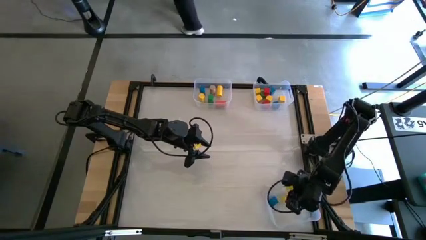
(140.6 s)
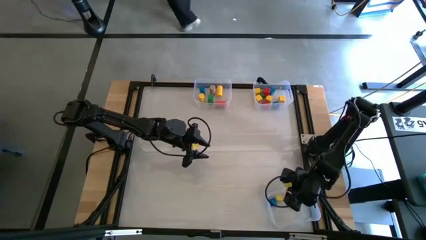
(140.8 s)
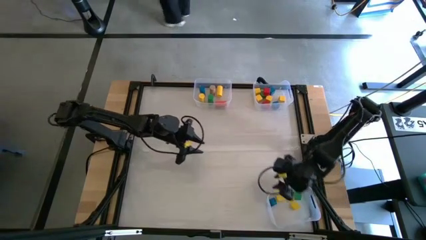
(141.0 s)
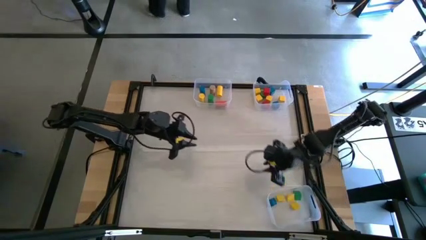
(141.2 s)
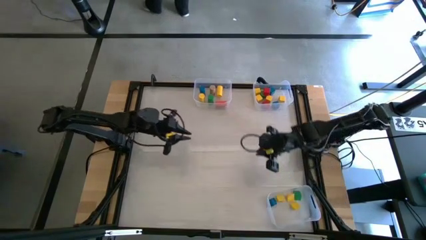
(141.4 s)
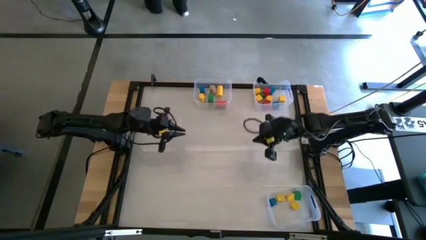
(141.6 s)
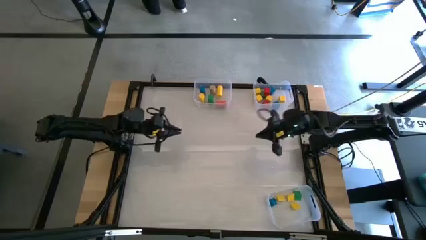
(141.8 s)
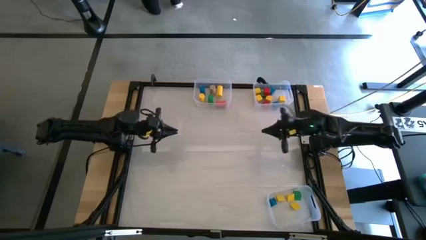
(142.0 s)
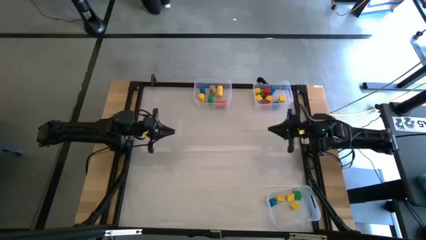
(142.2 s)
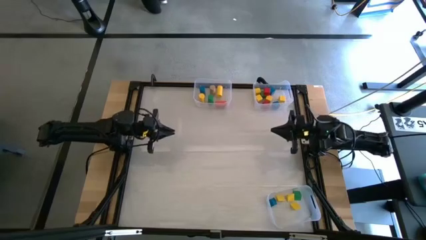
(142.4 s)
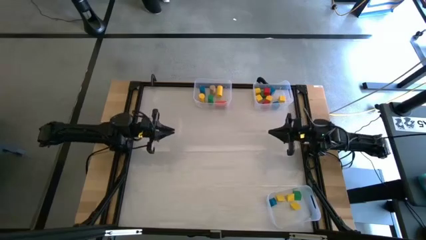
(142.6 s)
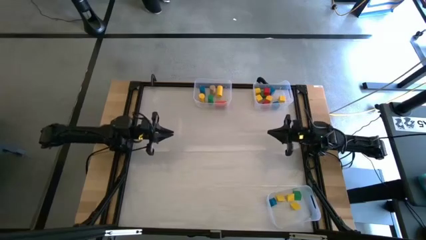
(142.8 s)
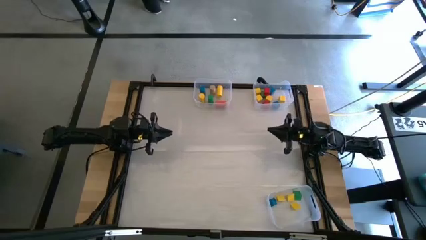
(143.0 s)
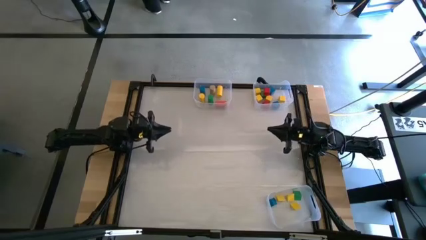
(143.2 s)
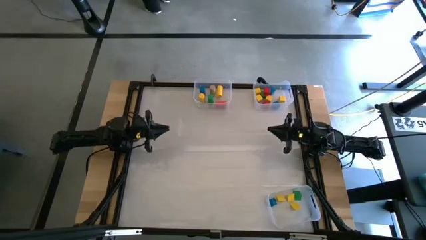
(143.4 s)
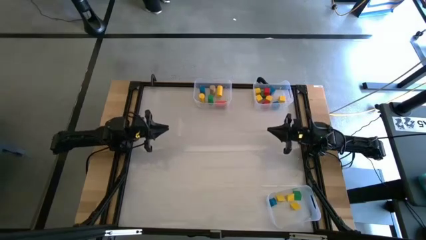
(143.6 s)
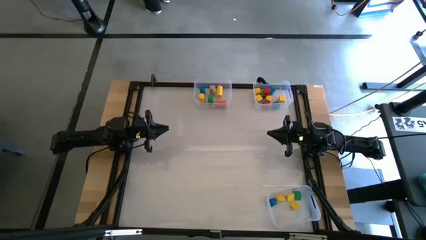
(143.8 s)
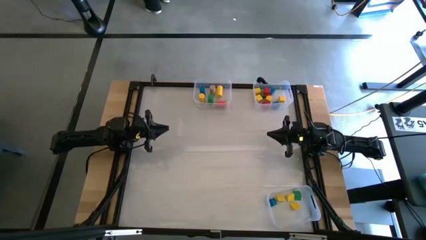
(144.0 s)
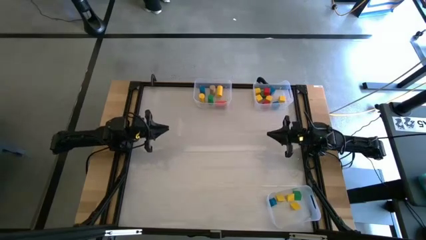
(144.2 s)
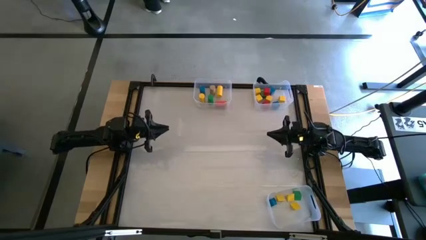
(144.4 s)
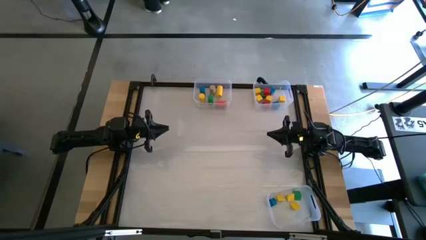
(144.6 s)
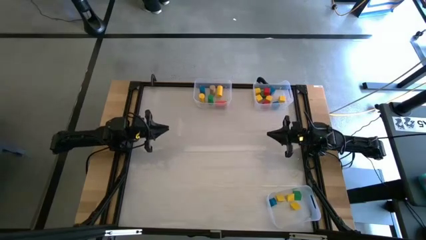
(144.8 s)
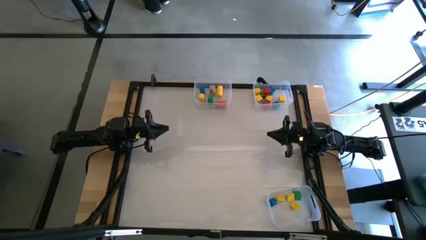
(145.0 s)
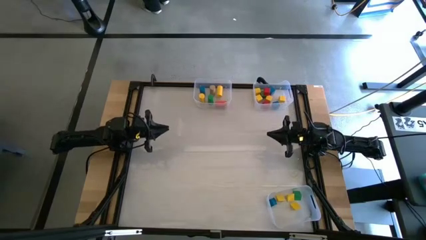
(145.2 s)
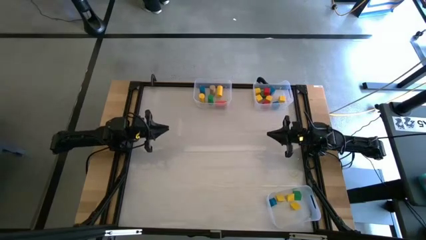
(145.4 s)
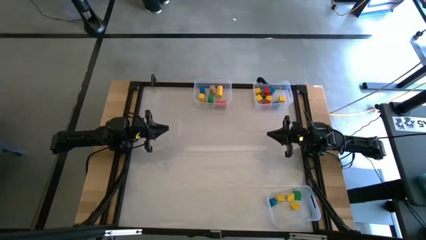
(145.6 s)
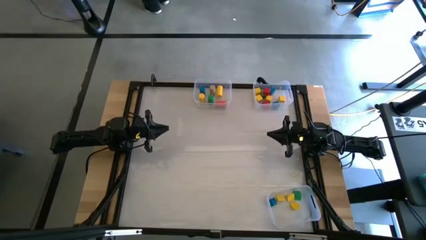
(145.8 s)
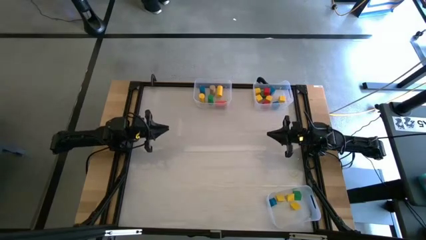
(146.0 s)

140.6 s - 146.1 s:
Task: Sort blocks by size
Return to Home Position

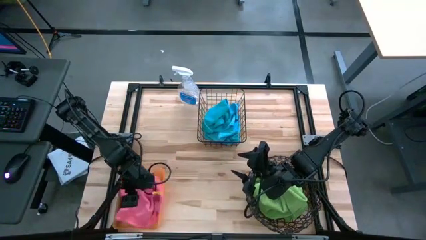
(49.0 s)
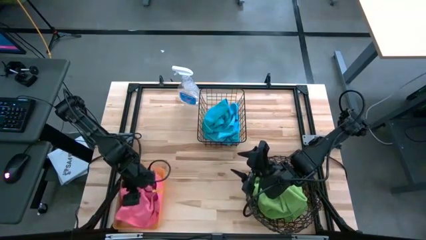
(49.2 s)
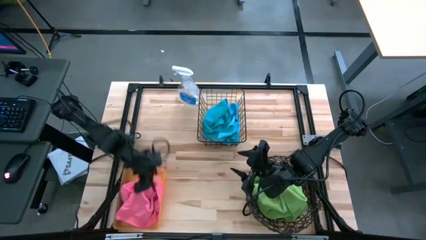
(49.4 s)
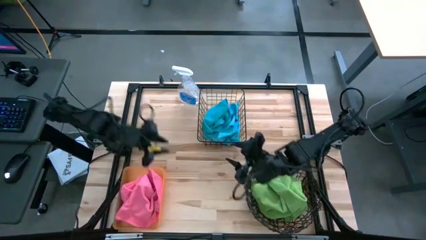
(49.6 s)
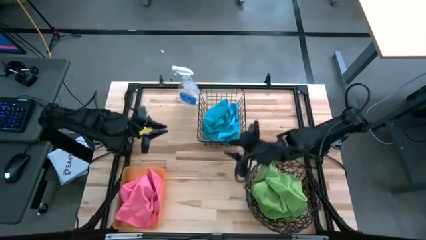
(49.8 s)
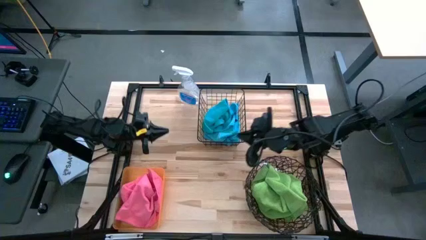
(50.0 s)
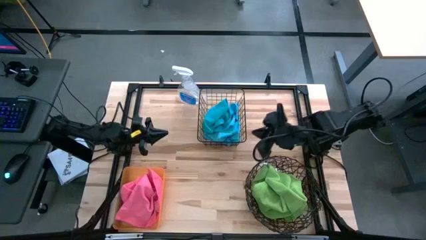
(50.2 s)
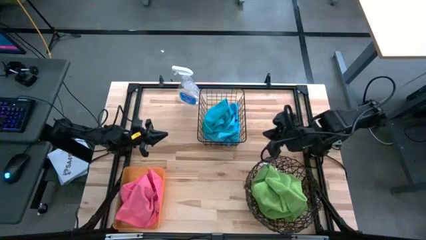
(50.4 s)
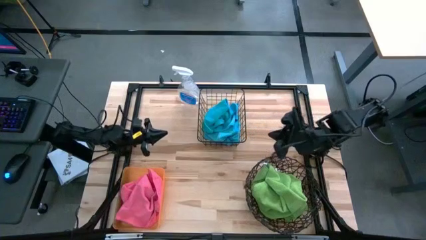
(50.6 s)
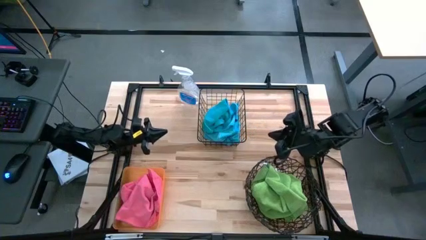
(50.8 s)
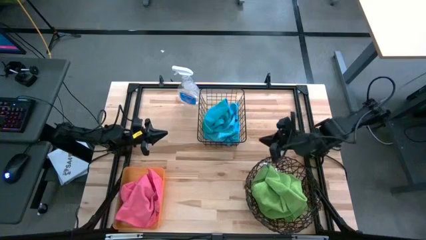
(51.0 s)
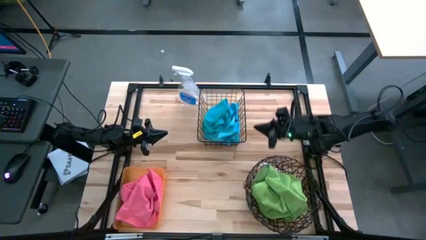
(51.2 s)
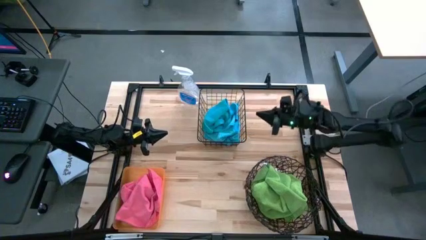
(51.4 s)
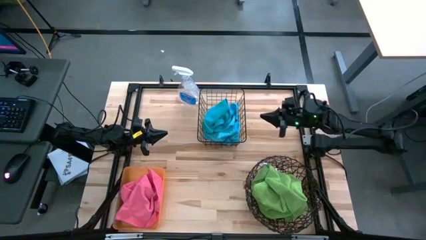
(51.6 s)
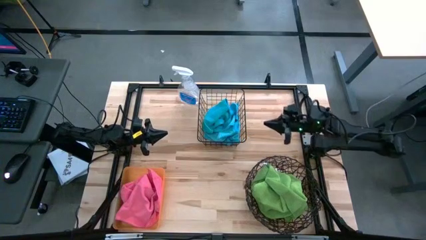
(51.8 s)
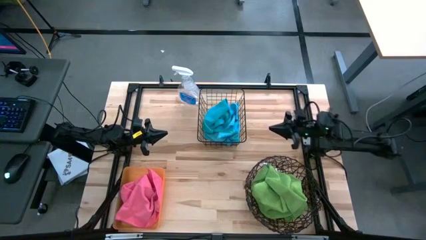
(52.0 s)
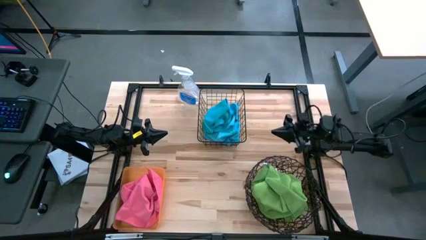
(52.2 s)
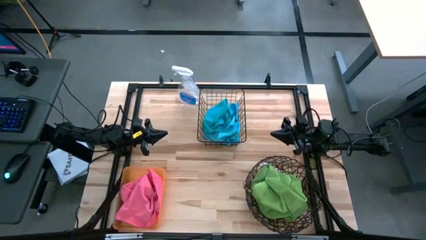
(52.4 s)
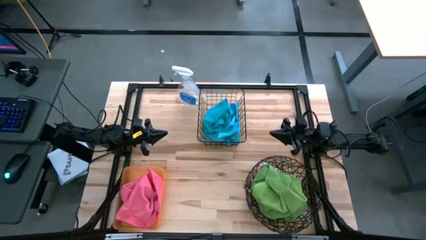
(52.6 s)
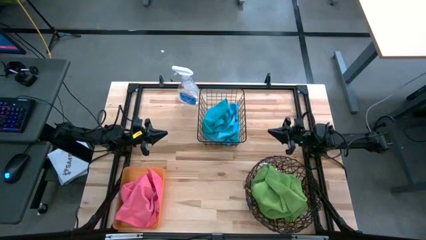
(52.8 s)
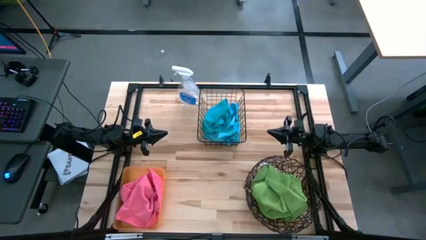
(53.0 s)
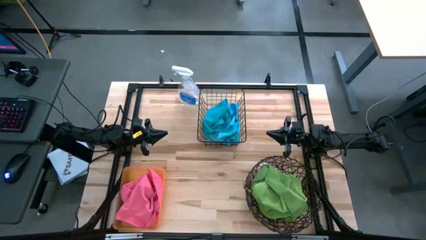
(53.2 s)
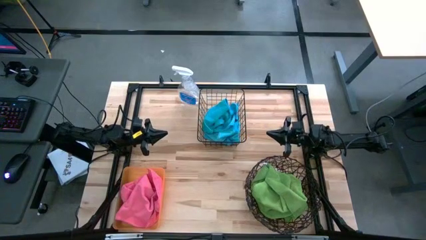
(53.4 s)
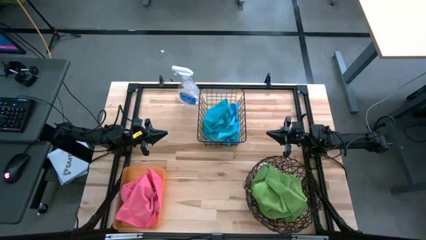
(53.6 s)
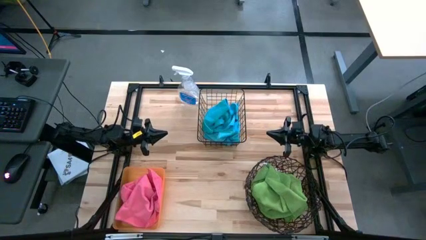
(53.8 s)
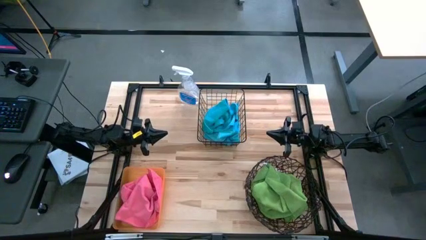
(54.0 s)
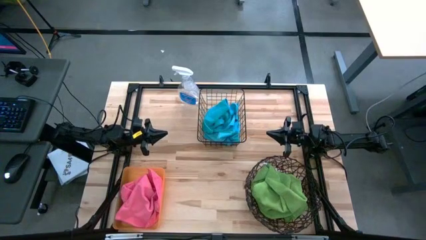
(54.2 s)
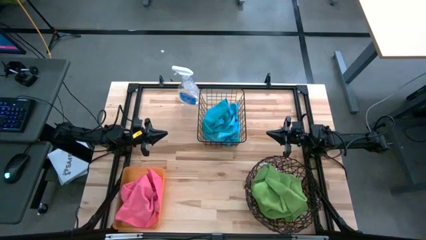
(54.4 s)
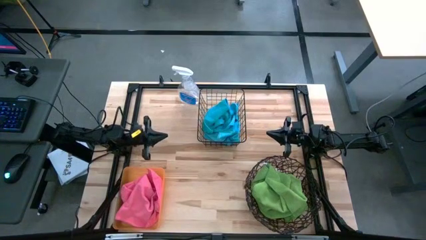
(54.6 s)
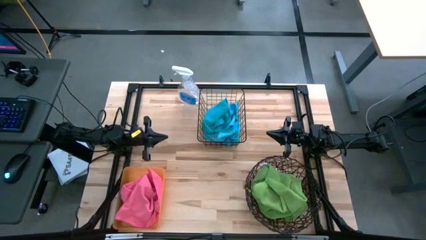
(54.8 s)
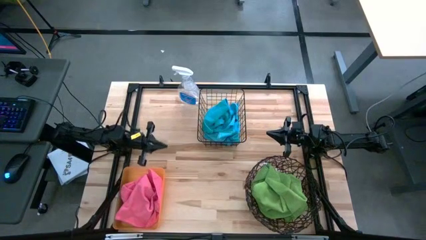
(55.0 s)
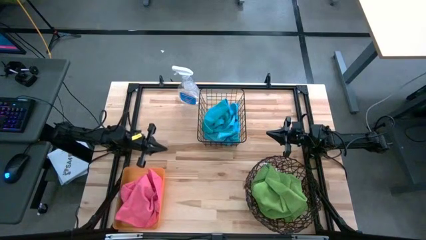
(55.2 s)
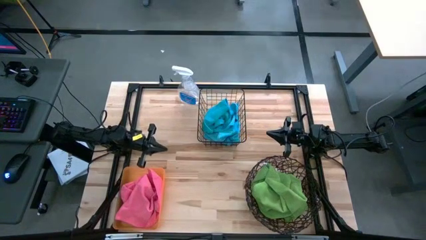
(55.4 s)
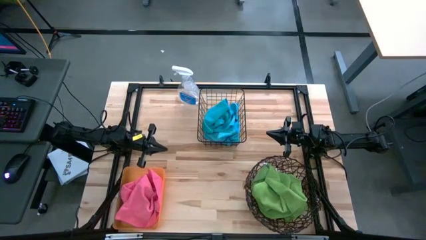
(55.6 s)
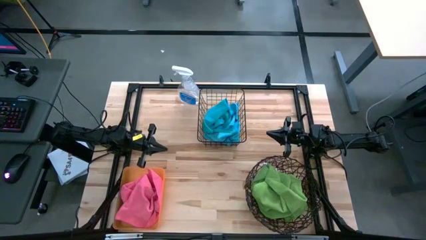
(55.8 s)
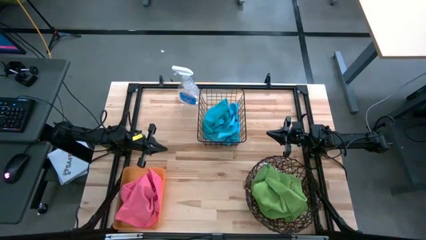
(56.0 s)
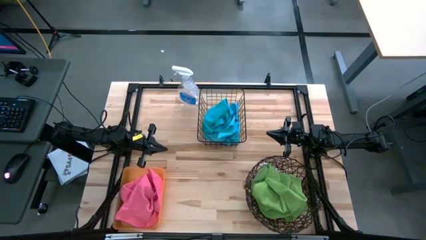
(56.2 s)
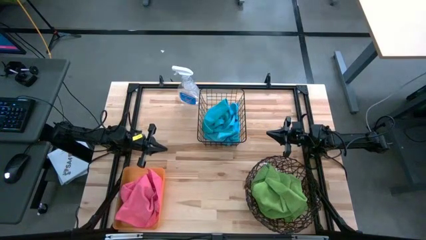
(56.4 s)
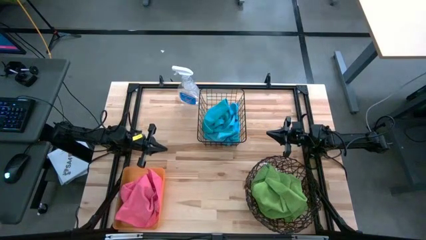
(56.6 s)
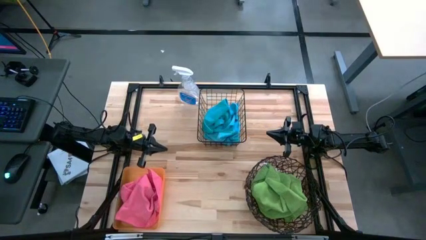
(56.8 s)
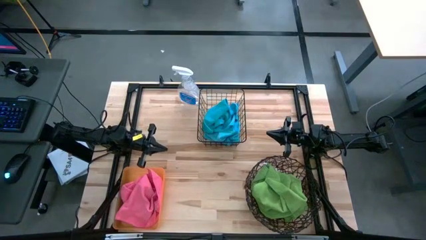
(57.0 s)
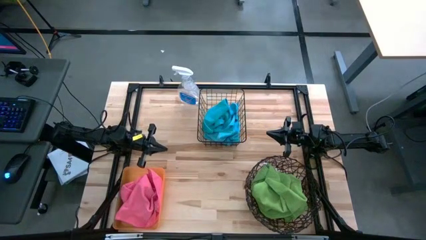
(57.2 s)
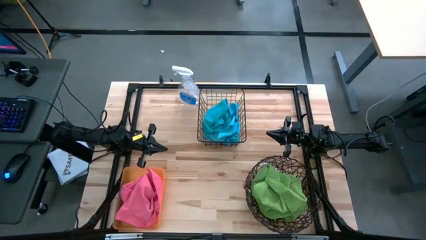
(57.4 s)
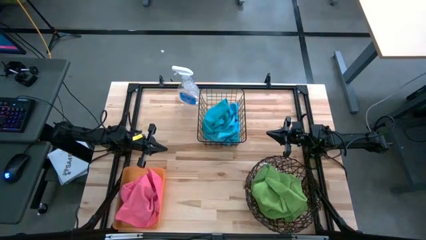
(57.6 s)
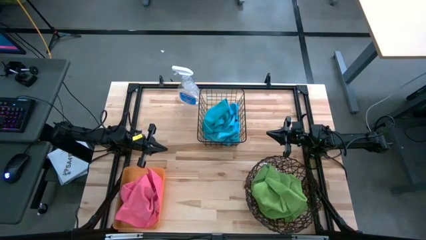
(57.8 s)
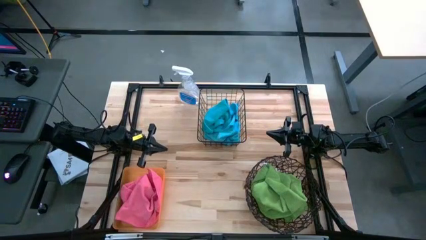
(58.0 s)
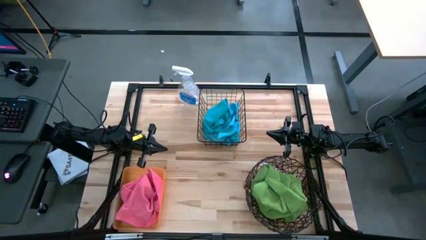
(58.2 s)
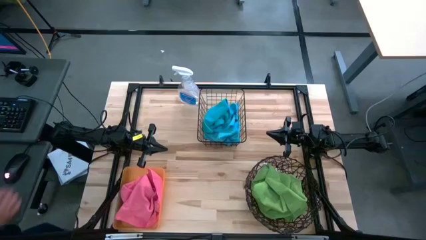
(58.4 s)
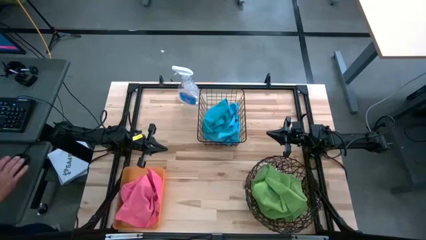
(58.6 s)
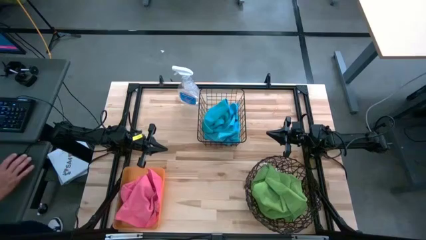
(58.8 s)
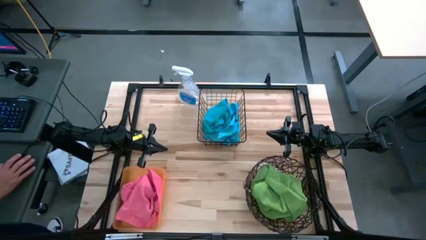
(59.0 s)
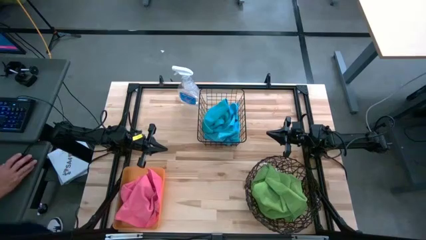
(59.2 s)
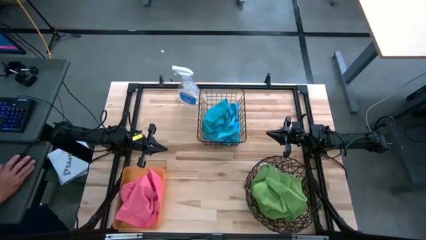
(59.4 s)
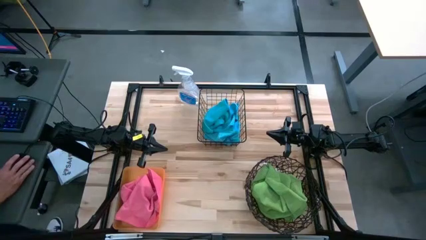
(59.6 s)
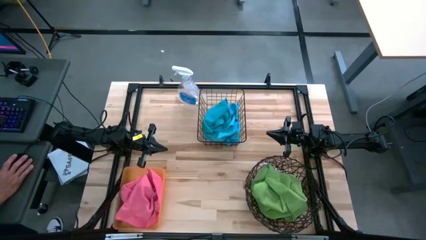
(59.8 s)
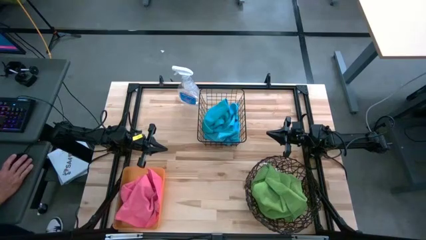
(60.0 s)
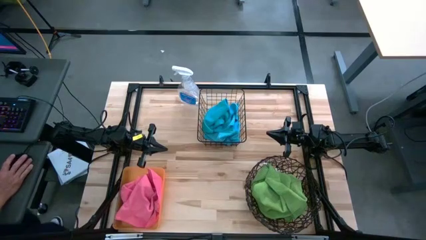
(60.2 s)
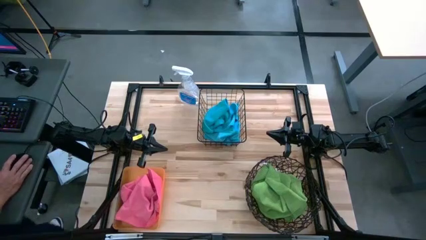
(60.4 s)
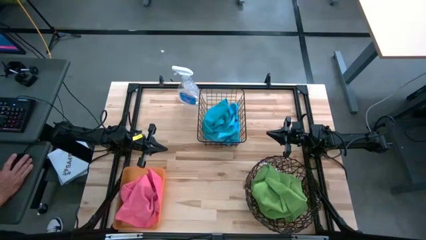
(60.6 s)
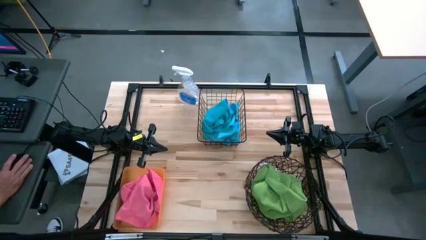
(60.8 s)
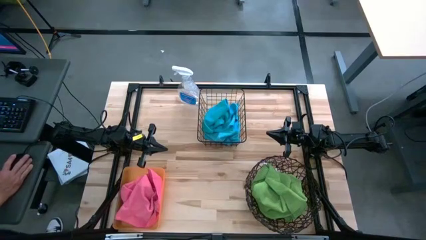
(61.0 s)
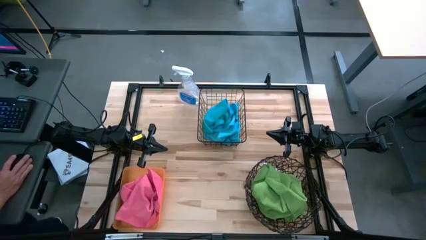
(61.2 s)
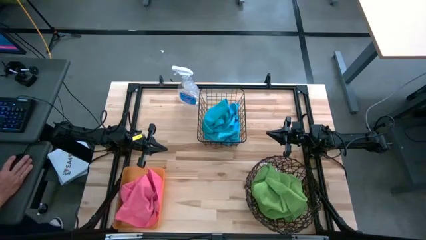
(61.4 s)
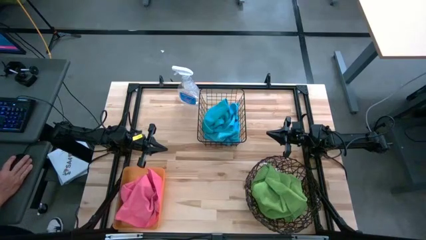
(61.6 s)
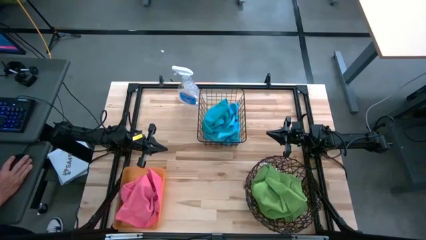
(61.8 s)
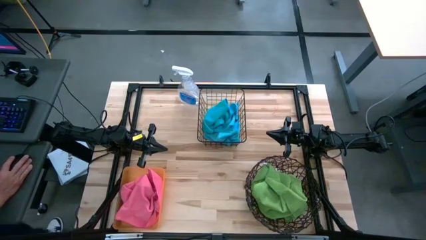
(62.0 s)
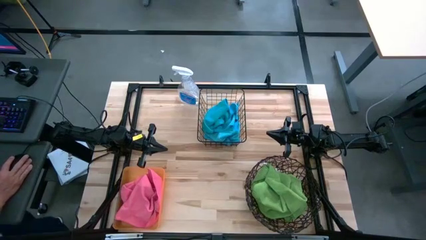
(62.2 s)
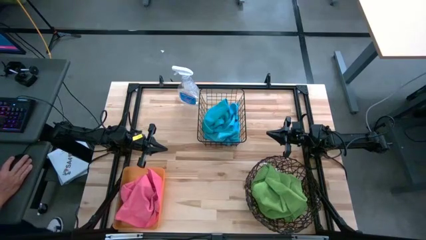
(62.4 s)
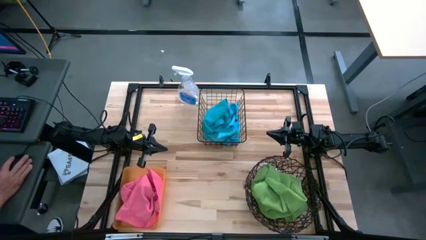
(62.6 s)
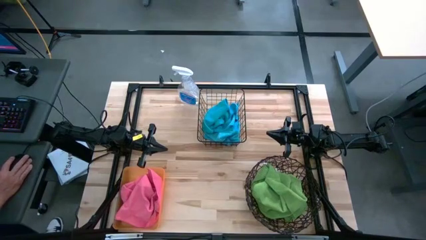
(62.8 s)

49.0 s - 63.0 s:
Task: Sort microfiber towel by color & place in baskets
Return to Home Position
